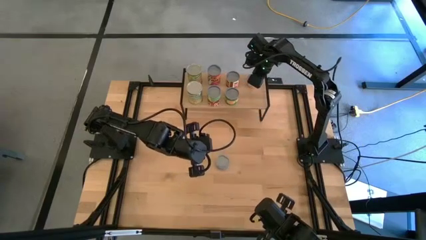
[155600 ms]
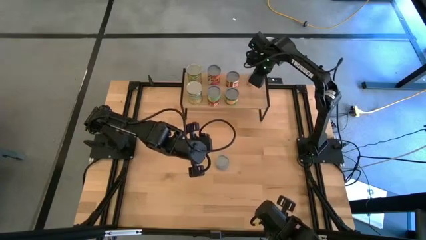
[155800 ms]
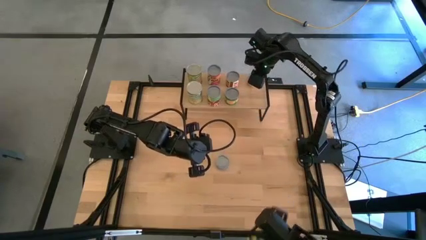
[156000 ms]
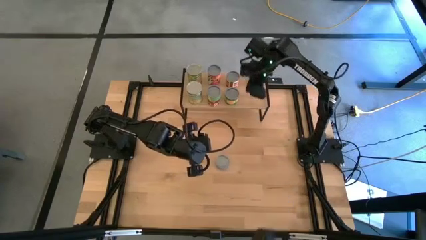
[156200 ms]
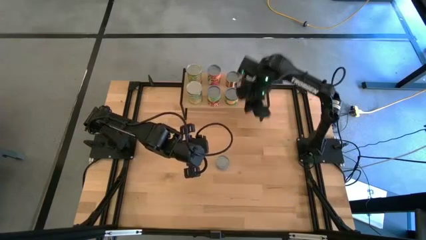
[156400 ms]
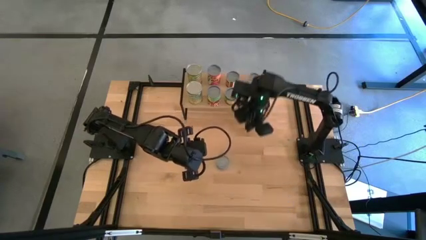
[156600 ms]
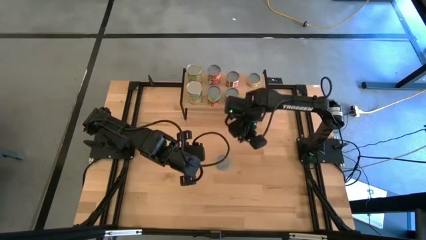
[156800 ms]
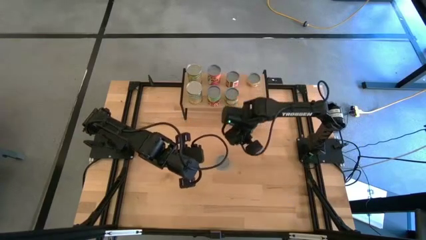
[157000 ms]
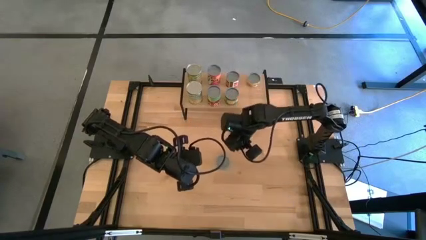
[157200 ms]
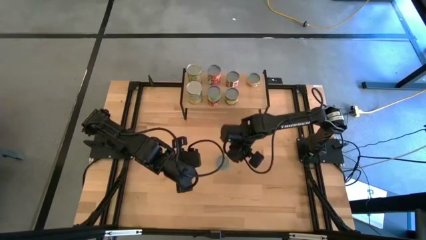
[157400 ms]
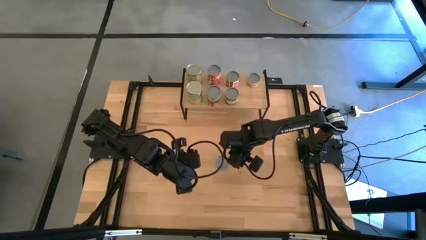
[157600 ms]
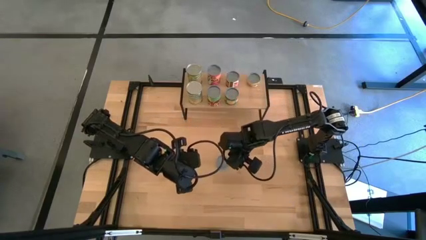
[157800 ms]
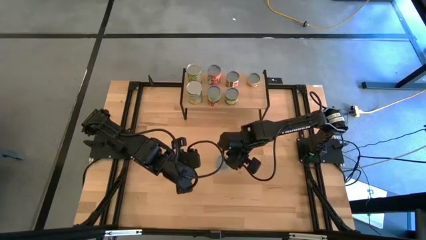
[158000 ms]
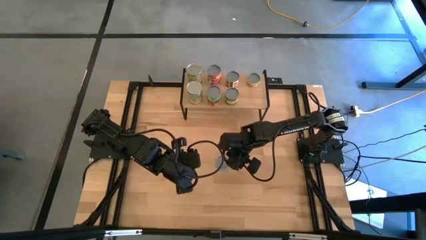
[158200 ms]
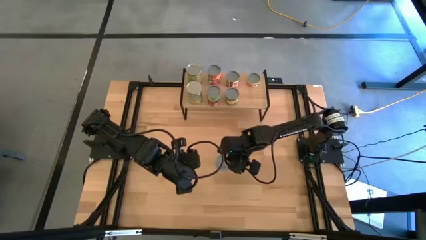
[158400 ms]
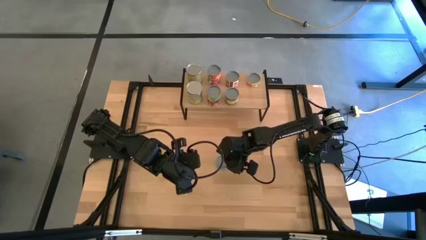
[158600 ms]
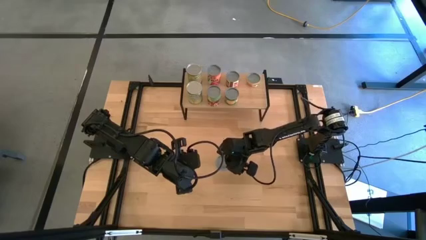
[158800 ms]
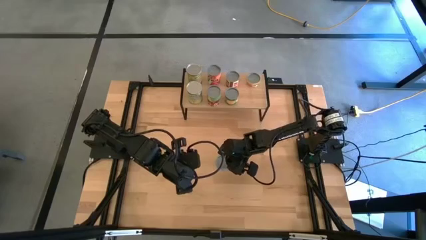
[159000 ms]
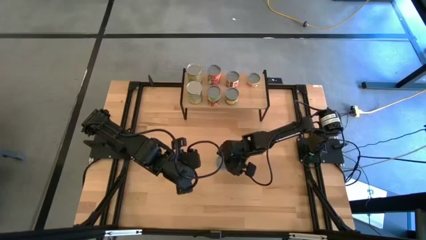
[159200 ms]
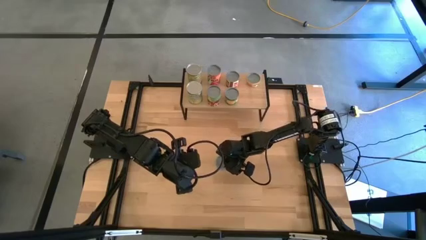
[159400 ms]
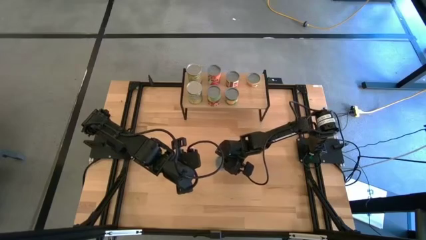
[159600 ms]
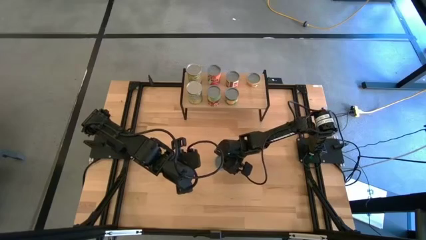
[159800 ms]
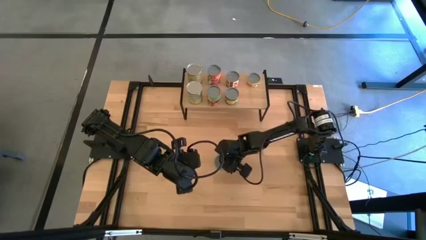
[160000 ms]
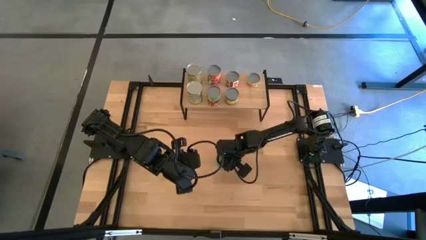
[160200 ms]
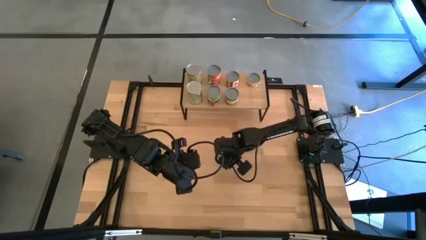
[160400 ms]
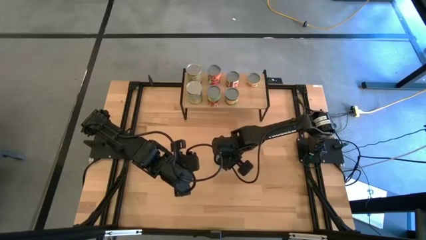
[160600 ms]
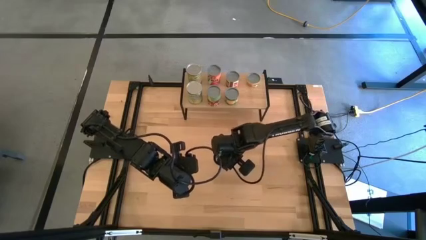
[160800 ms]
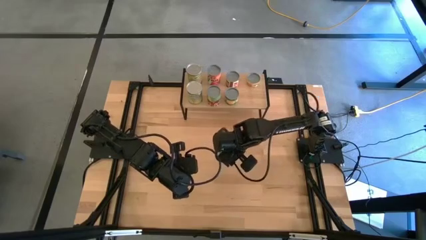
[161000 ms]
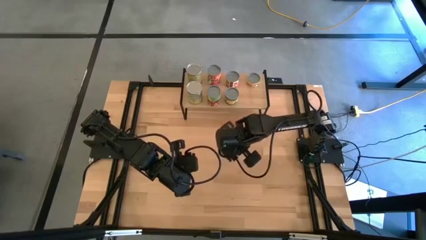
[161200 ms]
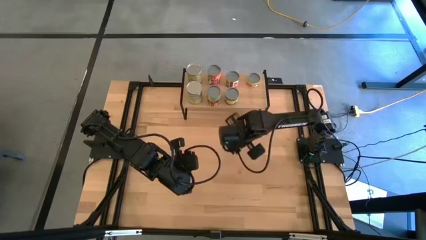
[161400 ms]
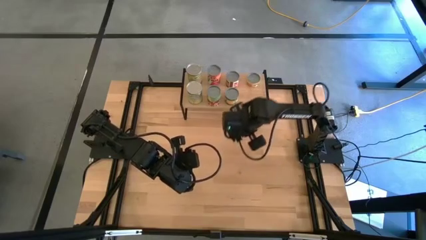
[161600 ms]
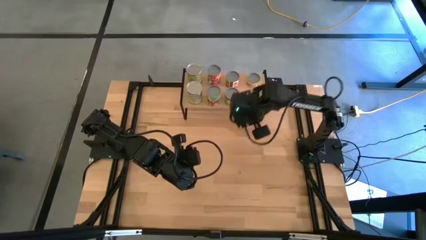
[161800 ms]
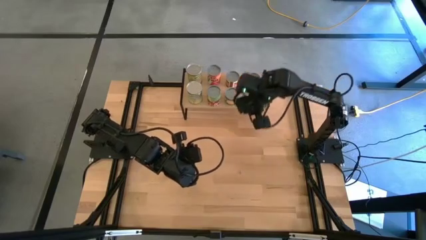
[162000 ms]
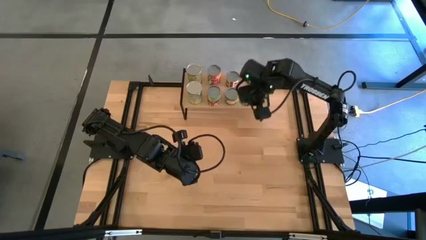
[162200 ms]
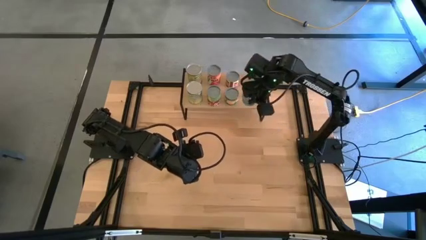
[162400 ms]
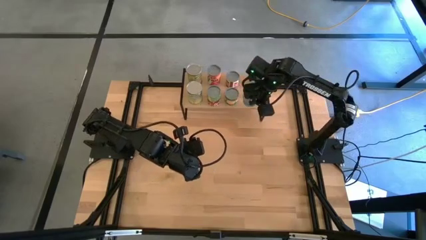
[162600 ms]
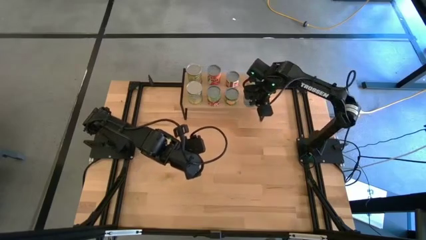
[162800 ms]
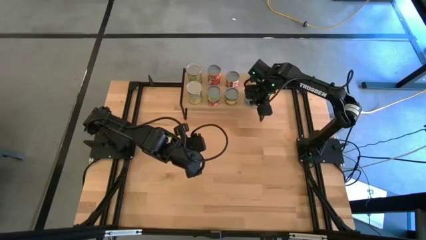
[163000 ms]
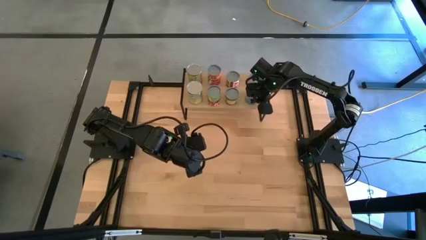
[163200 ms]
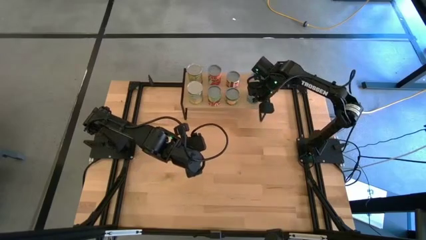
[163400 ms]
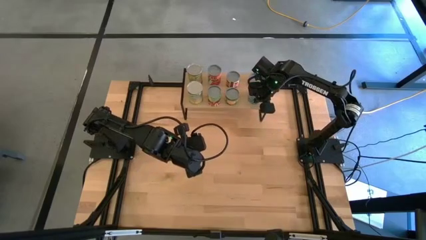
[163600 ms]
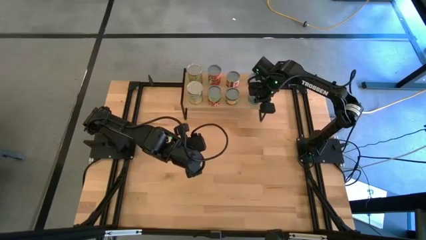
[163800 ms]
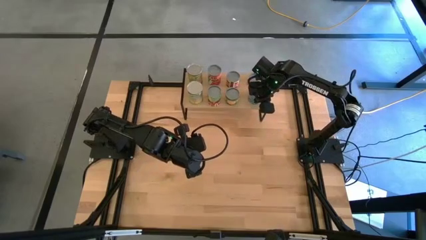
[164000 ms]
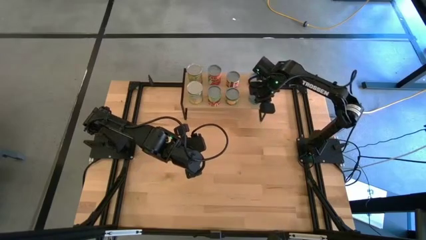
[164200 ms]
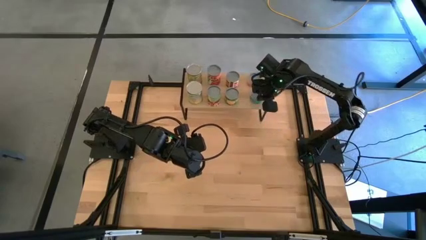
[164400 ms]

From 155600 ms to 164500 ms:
Task: Pick and place cans onto a shelf
Put the canned tuna on the shelf

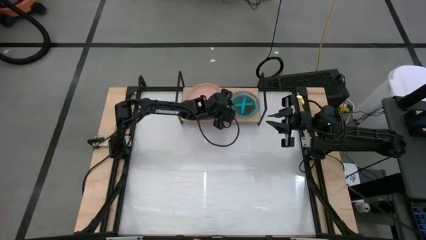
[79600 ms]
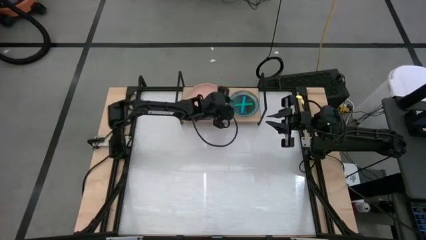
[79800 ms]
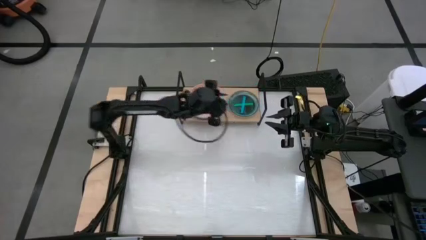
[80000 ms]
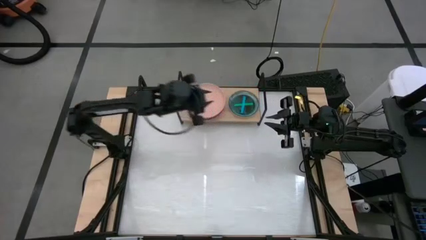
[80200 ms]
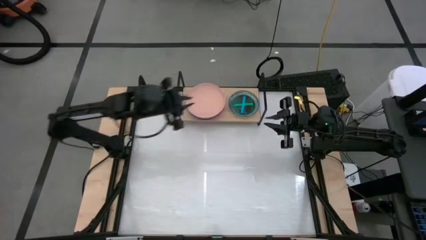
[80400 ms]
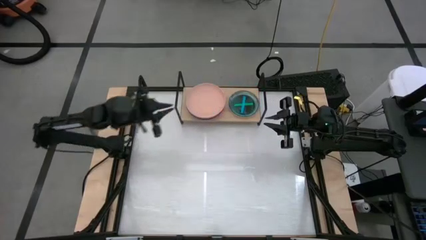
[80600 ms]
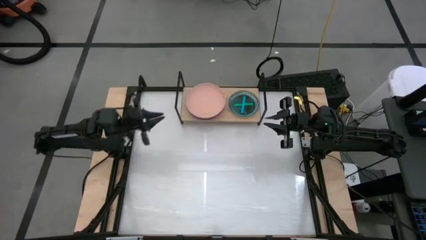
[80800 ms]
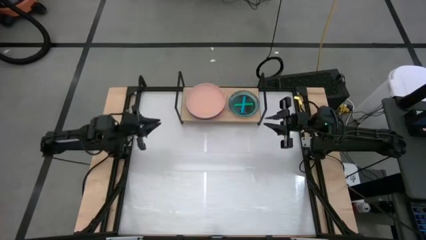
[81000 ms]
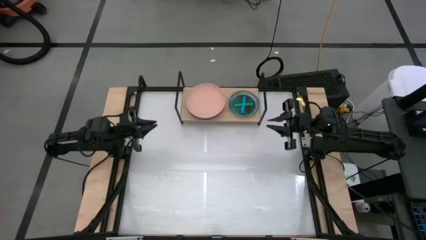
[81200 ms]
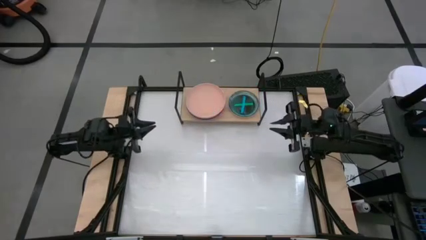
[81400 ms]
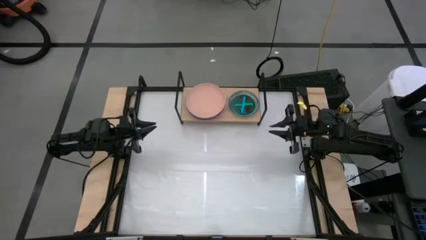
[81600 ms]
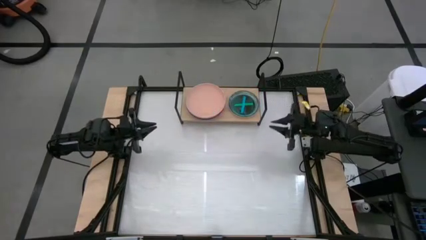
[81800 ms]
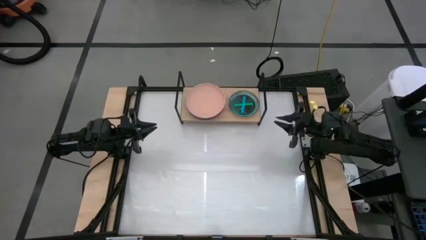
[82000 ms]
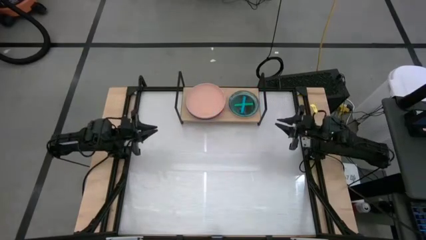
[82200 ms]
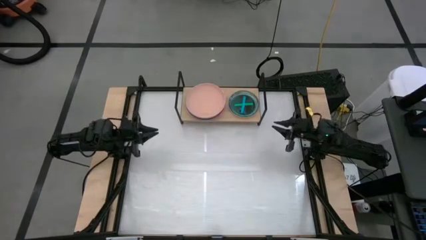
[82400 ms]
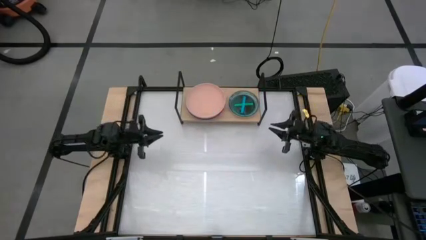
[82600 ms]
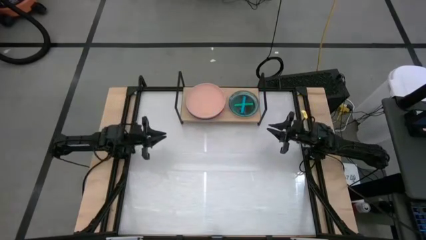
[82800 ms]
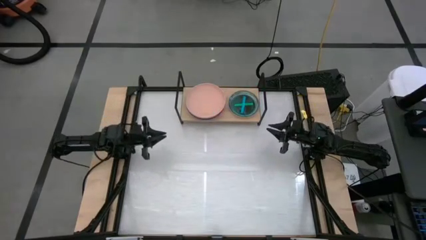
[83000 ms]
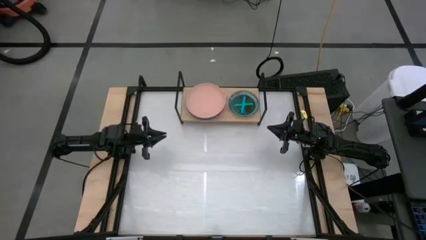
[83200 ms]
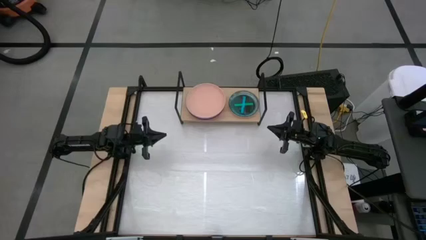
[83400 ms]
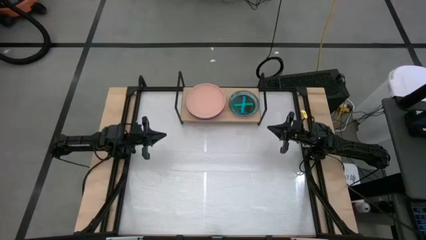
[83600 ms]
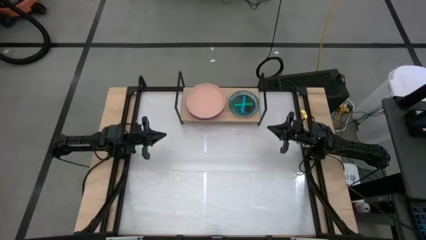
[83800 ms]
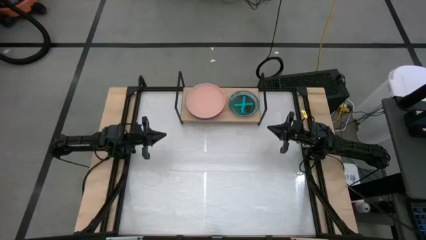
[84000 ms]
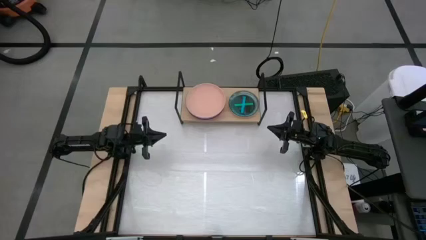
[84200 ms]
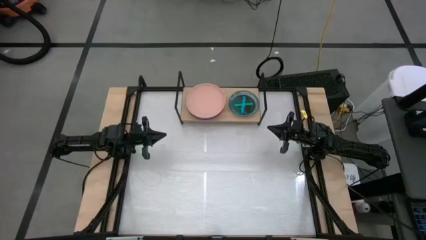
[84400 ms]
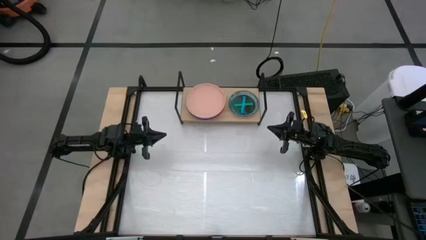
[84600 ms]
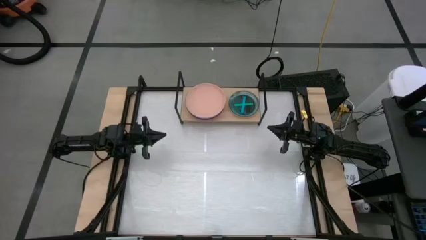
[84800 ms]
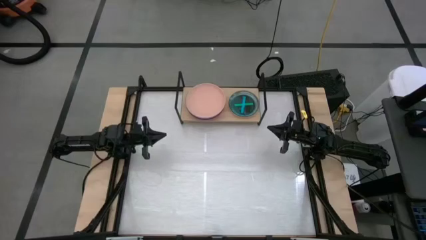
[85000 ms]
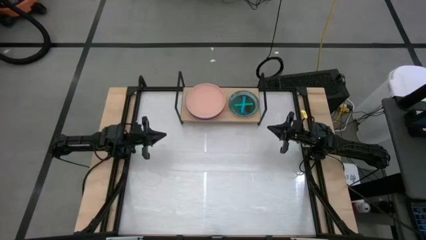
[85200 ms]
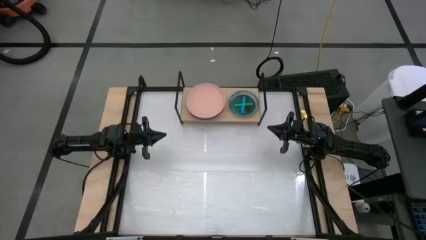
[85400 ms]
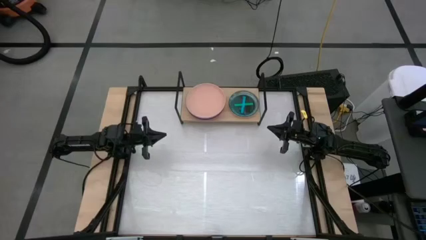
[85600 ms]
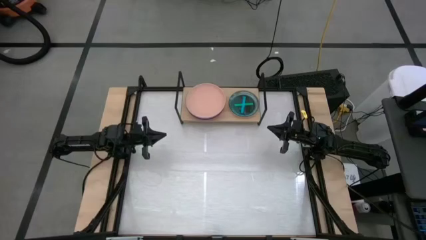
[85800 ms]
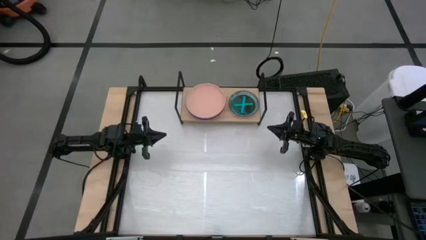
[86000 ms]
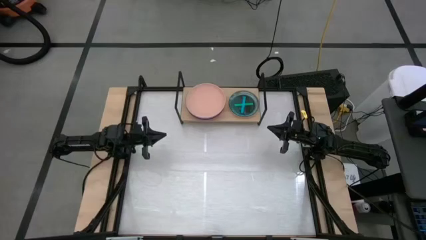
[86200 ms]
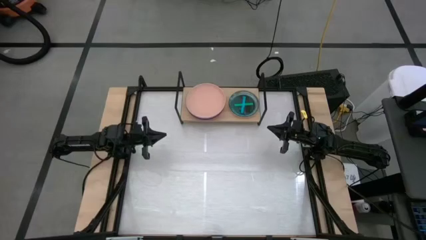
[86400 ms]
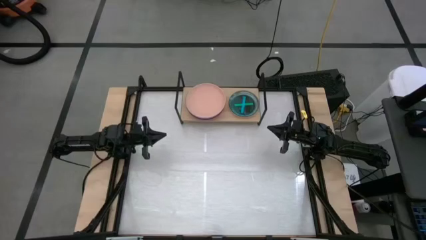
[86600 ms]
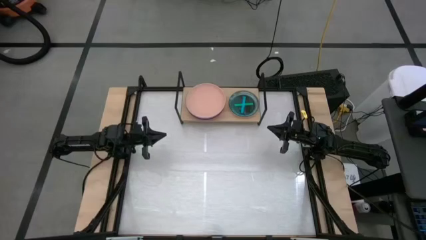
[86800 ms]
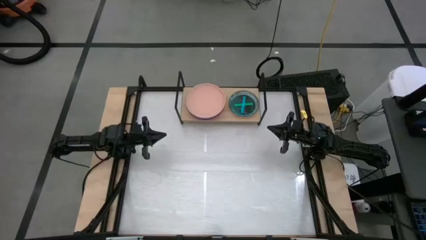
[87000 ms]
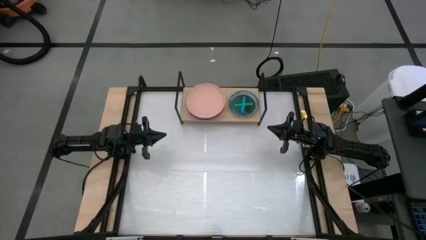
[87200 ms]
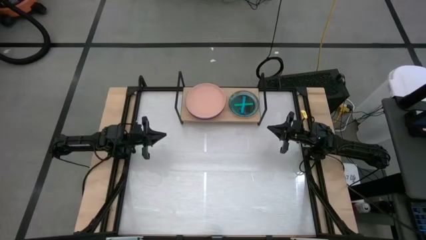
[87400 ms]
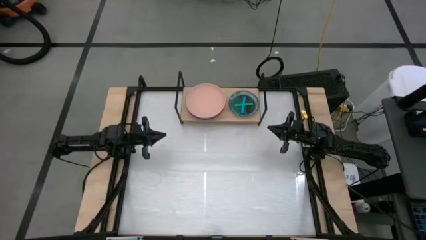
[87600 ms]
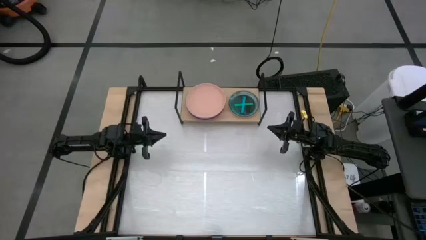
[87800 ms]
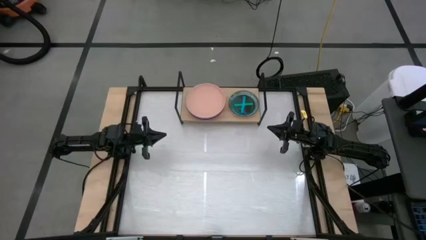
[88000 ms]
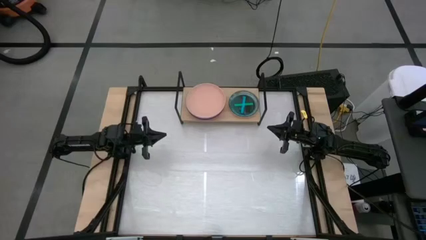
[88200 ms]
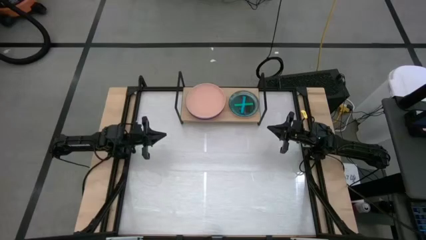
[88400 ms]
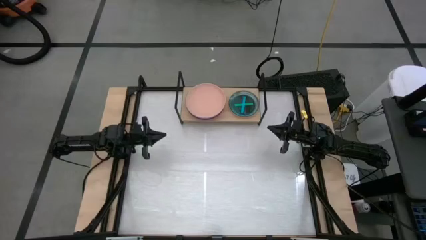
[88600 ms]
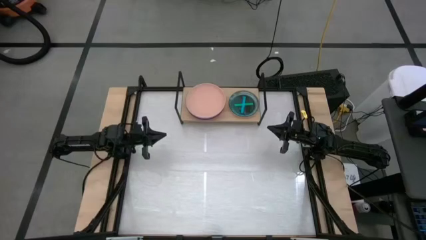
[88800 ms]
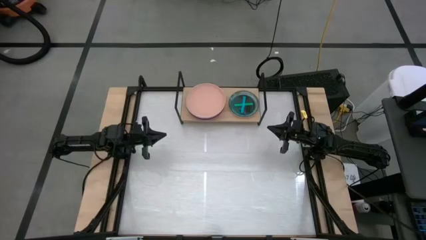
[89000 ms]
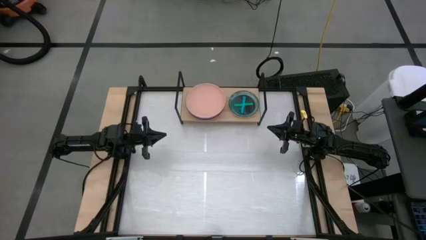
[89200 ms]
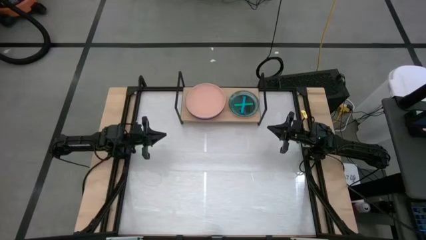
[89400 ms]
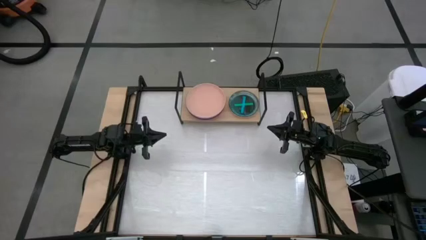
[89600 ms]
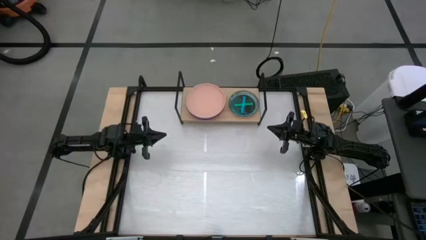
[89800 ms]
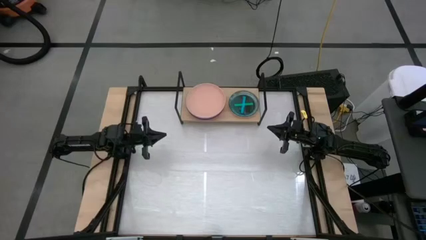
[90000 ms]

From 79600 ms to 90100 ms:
Task: Place and stack plates onto a shelf
Return to Home Position
